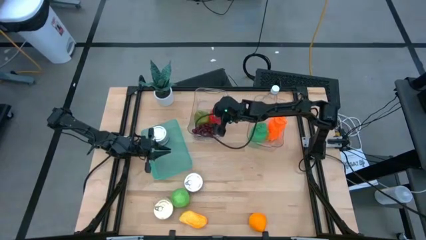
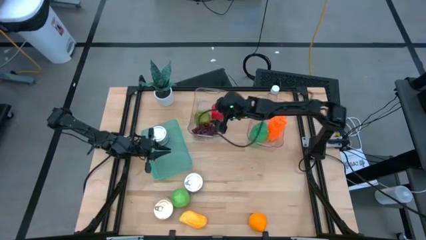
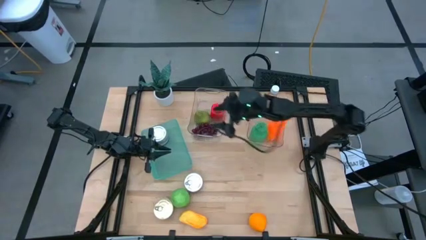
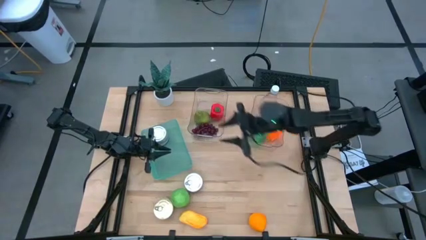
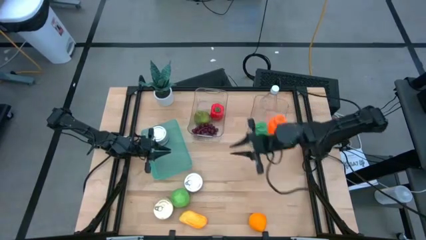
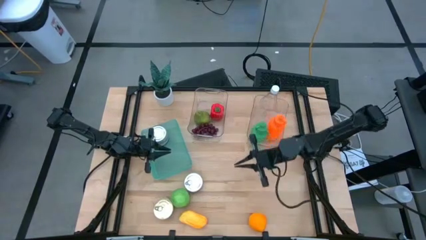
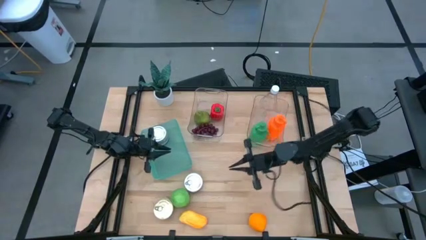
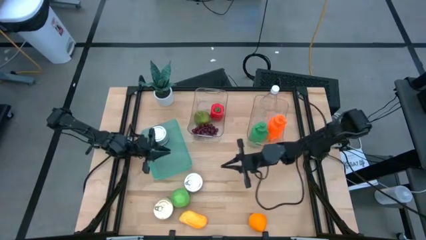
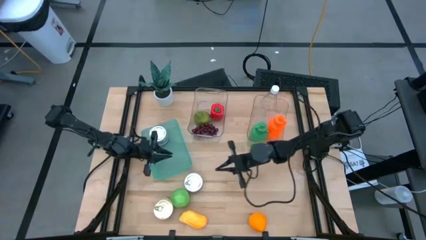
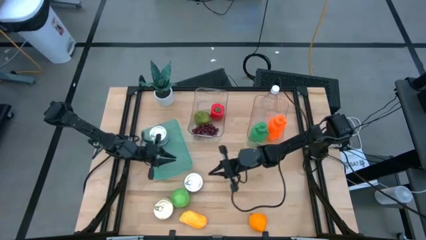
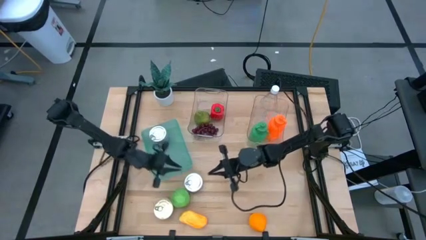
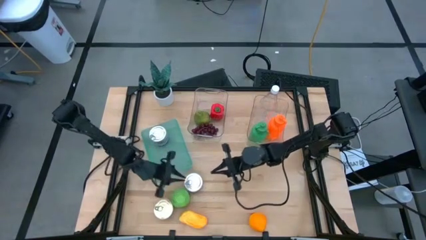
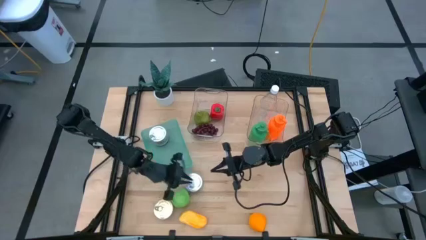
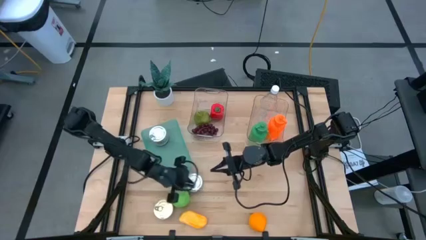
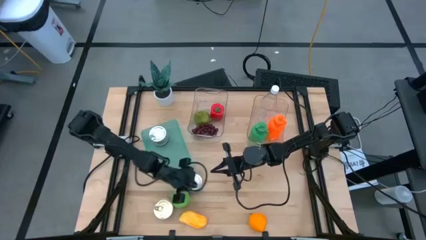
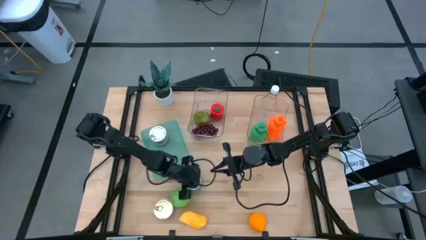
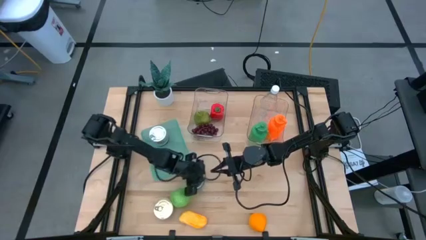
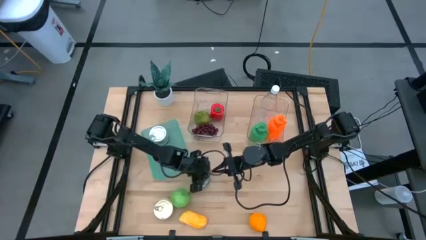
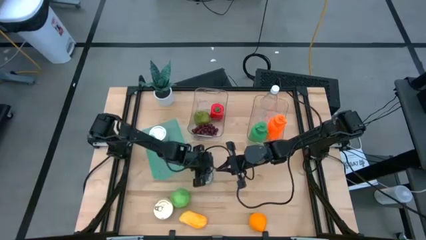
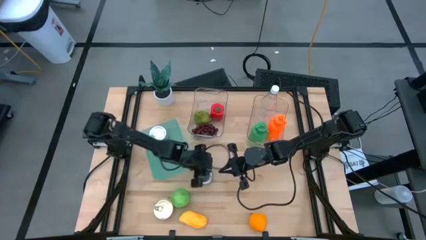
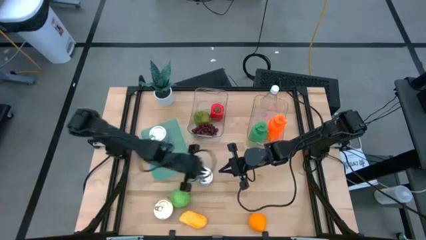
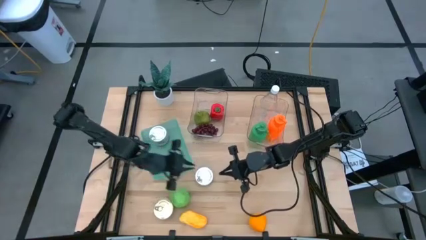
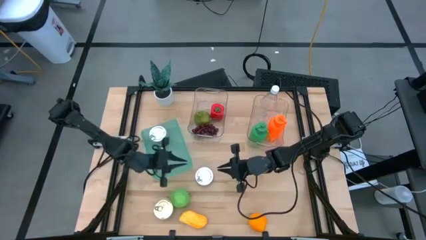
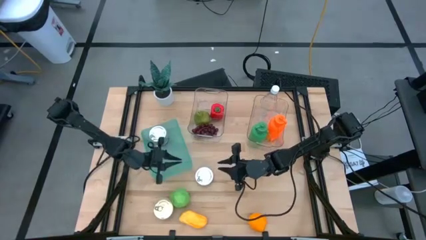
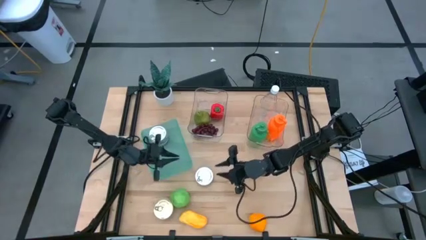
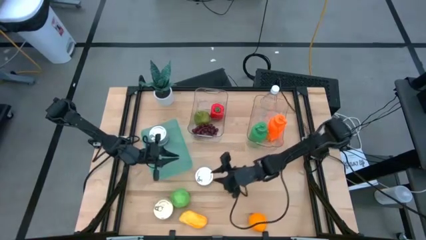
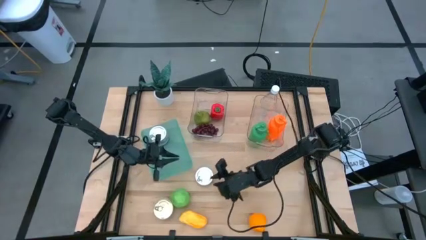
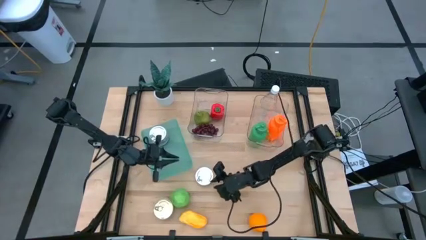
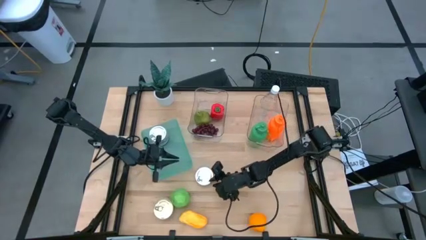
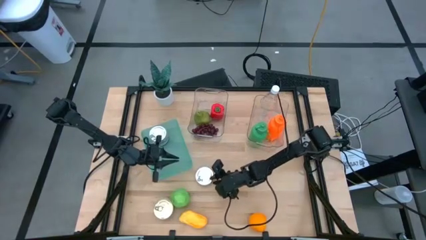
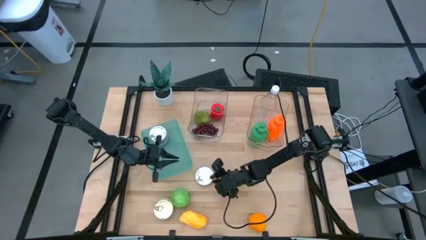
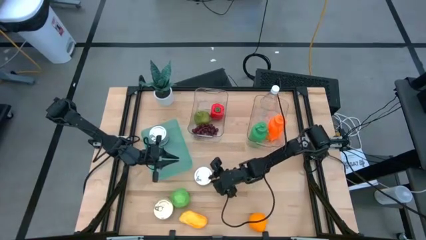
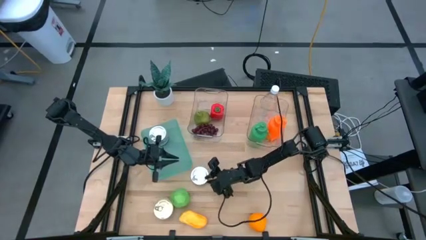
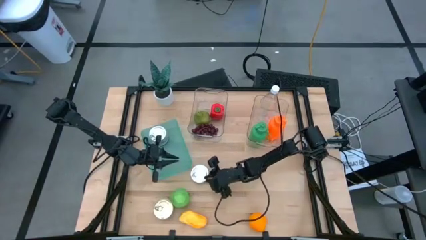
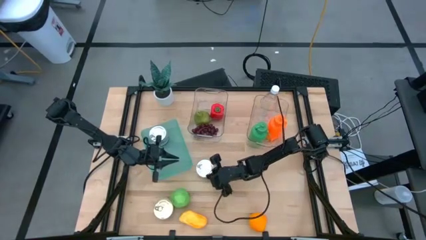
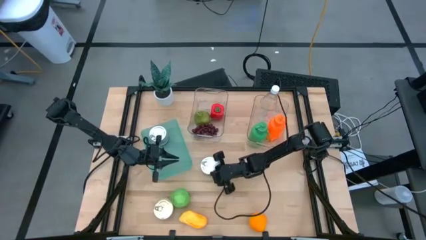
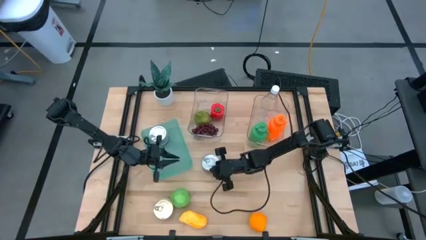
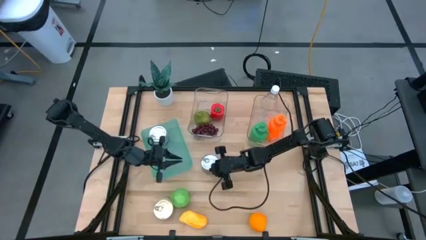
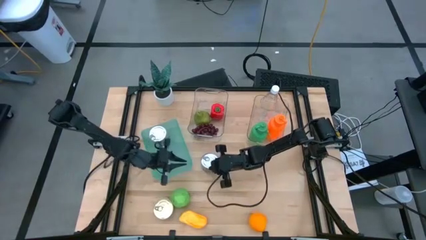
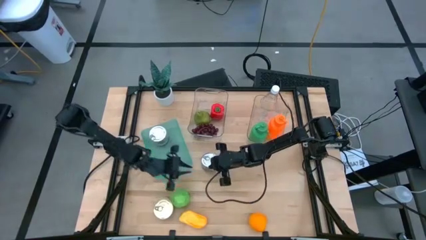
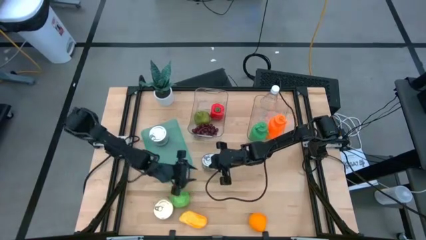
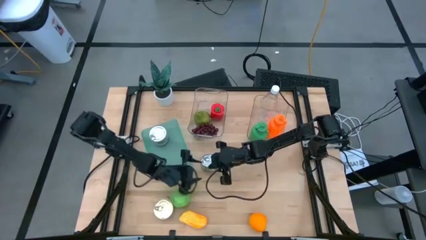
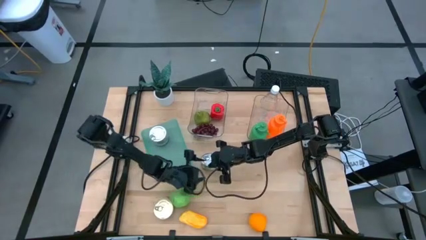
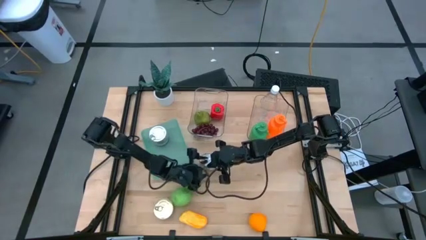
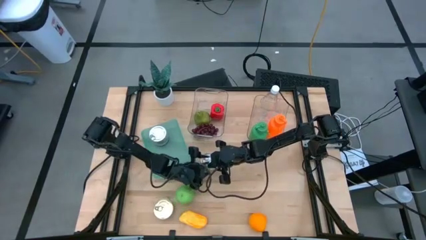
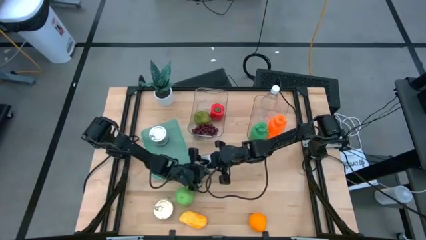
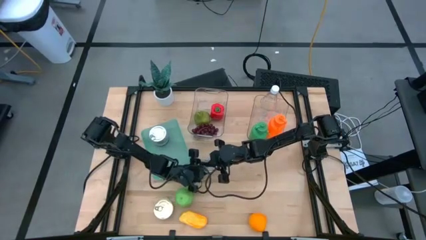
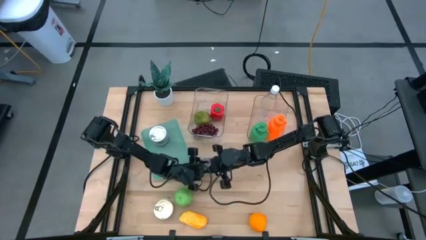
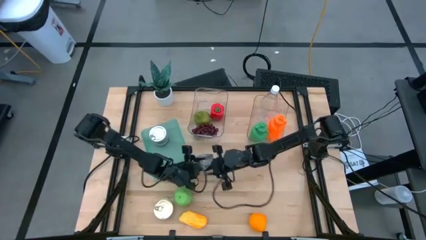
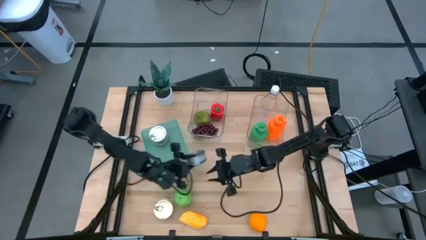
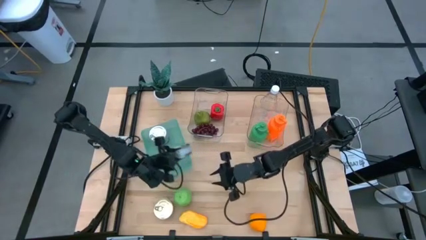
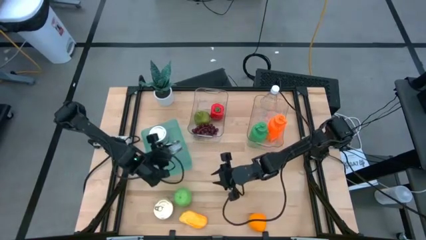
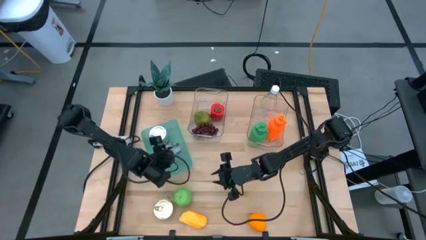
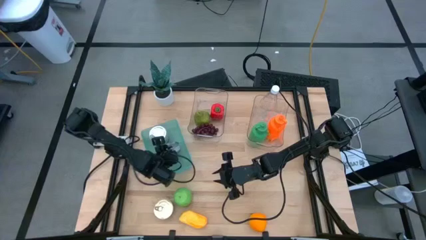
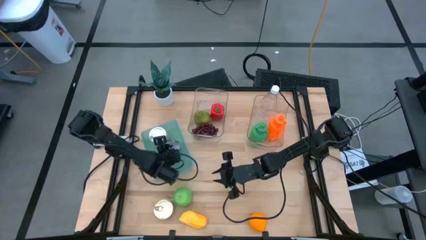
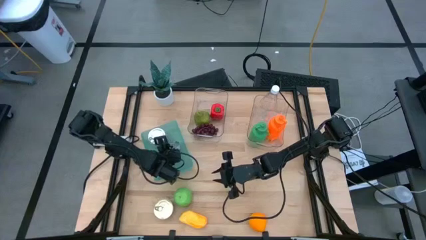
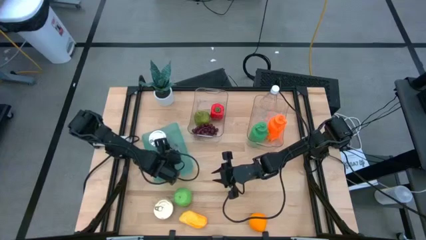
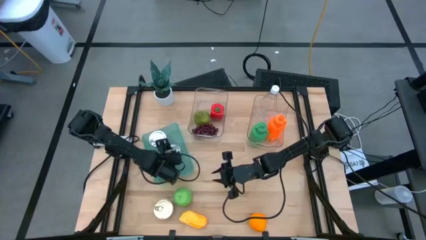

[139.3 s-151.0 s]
Task: Pick & Place Food Item
Put the green tuna can into the green bin
